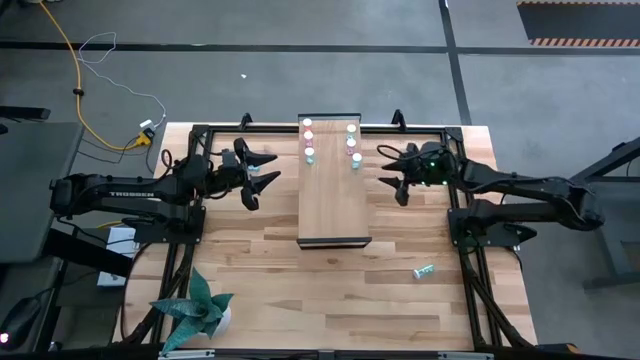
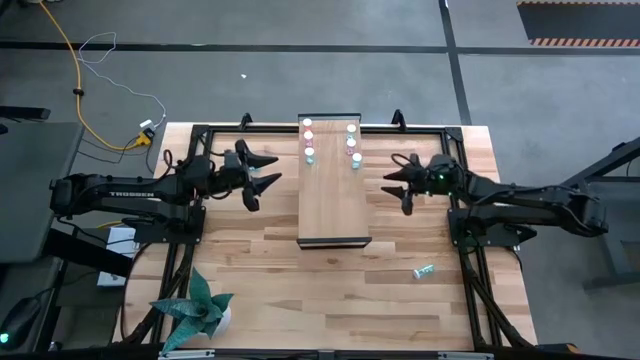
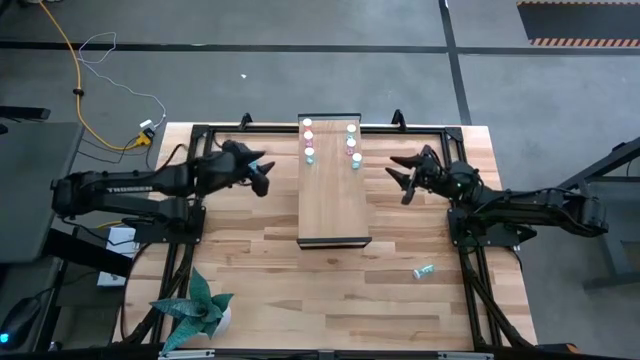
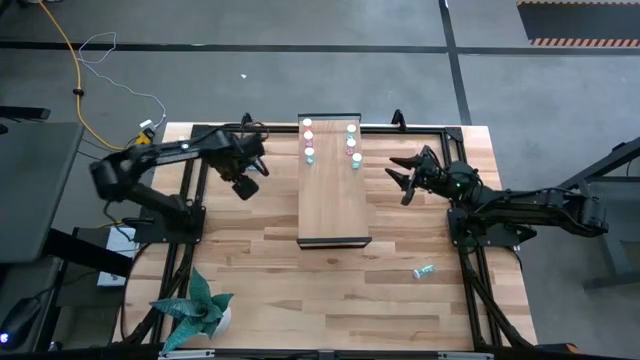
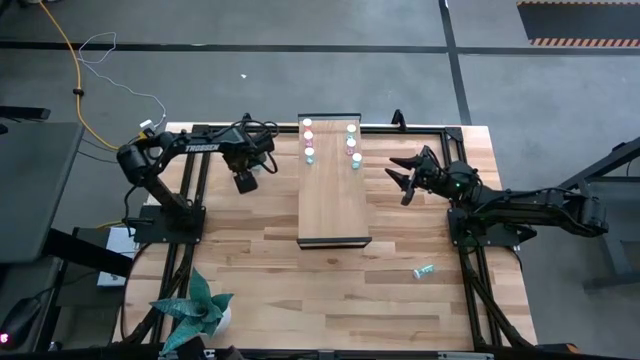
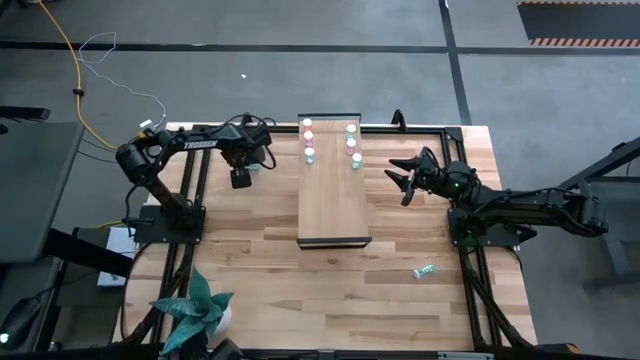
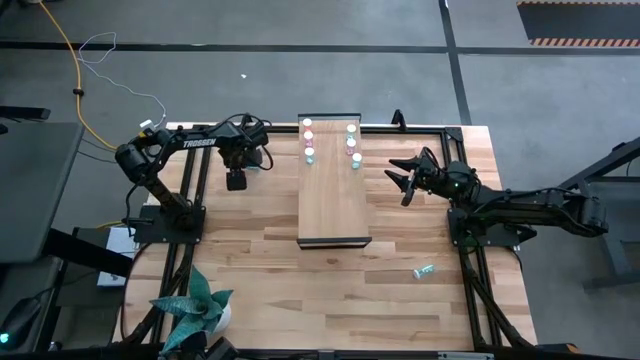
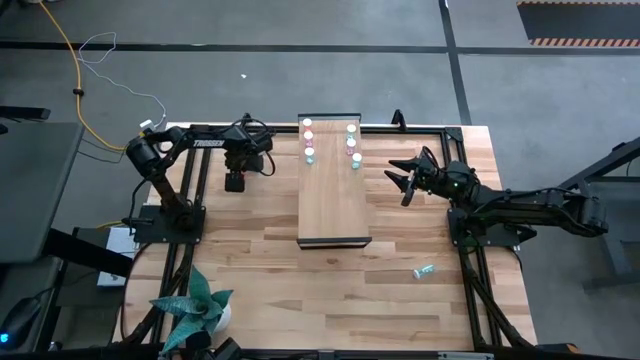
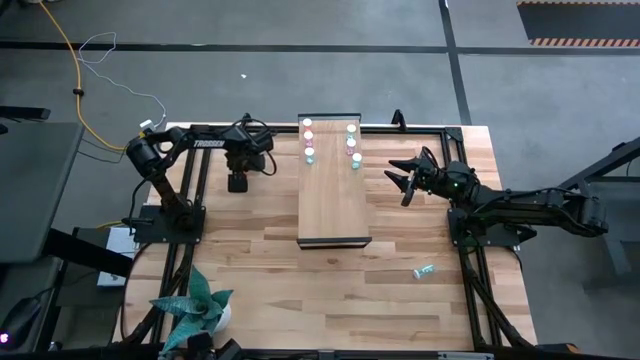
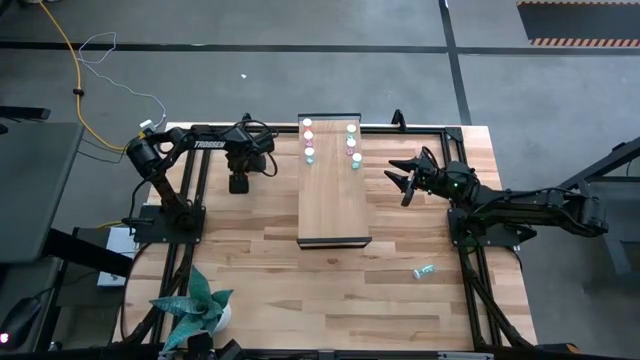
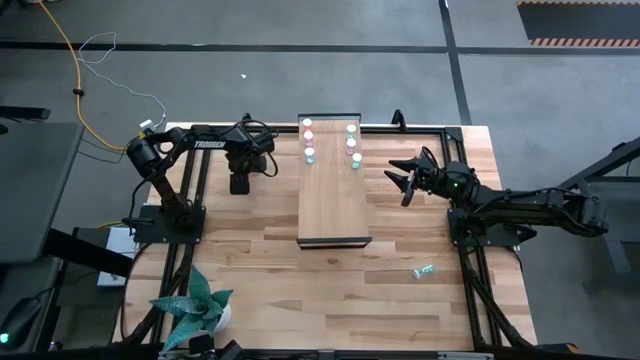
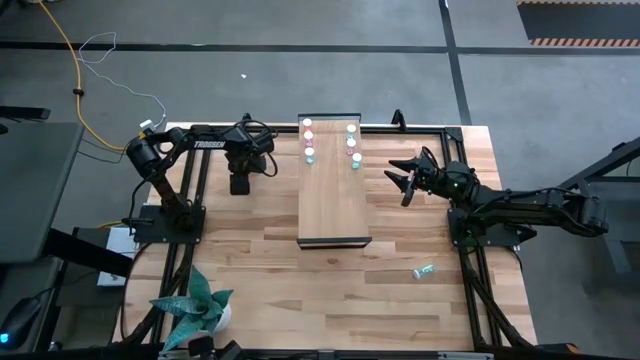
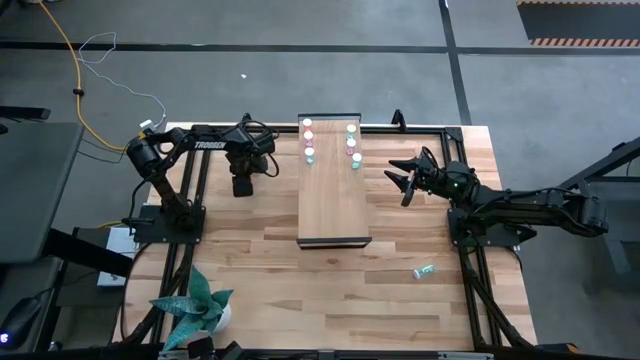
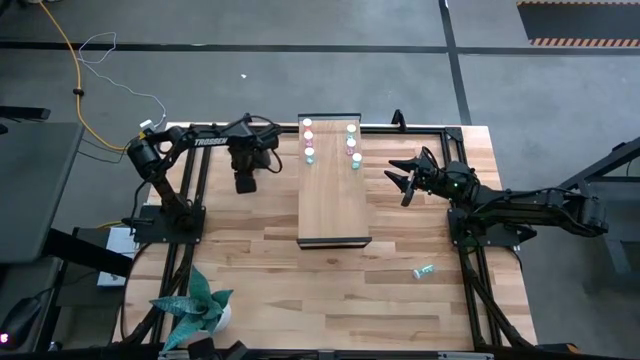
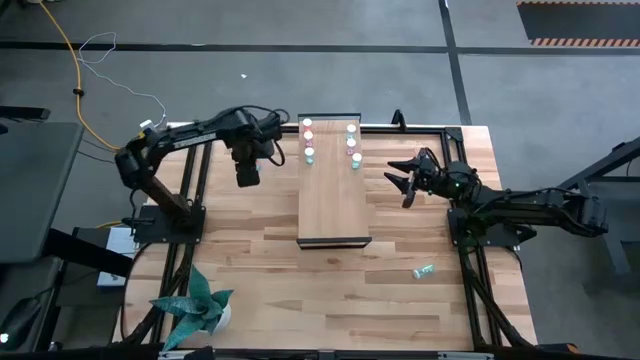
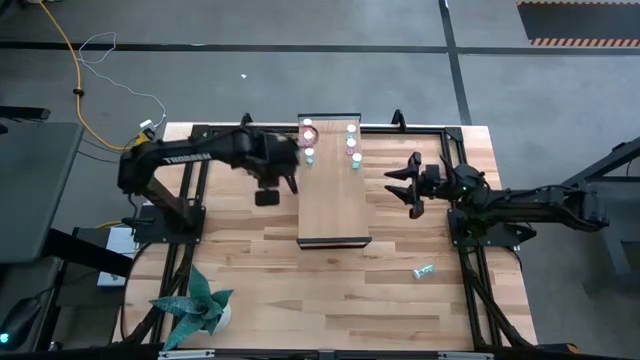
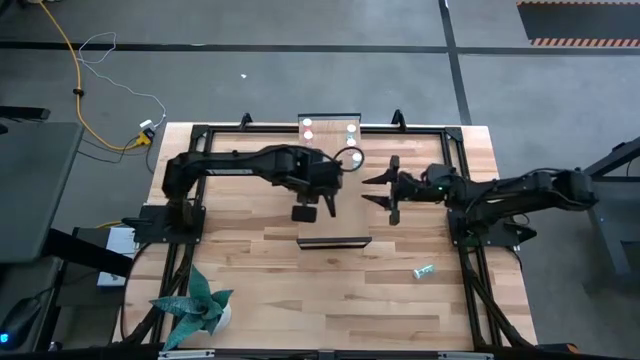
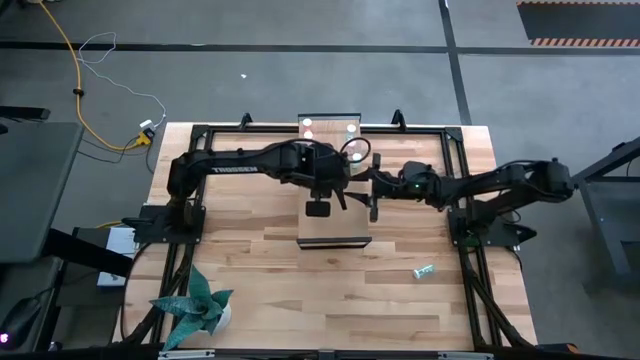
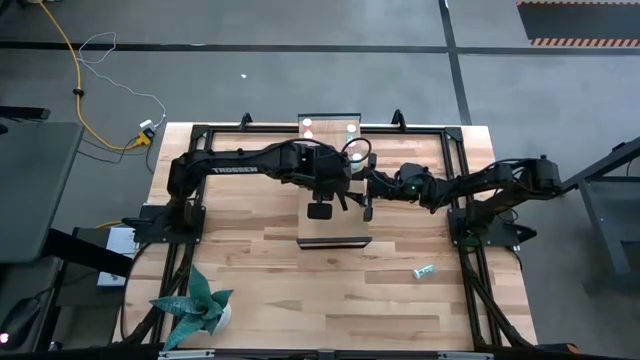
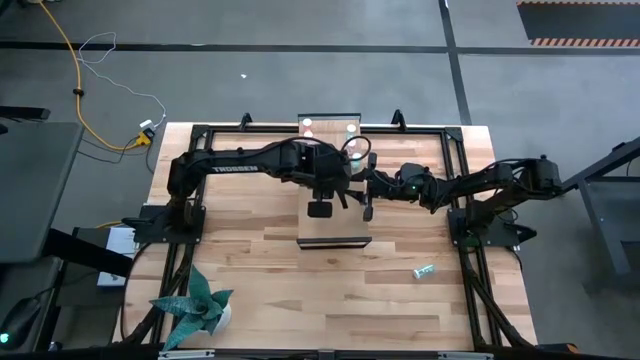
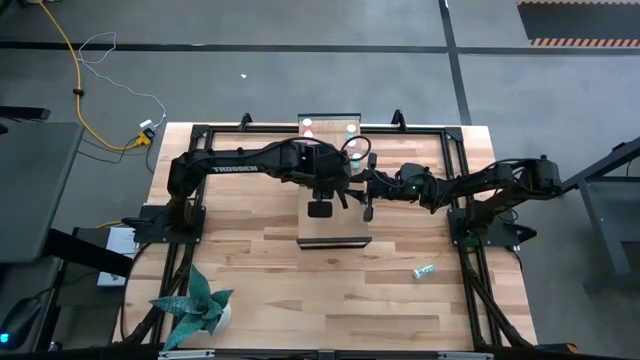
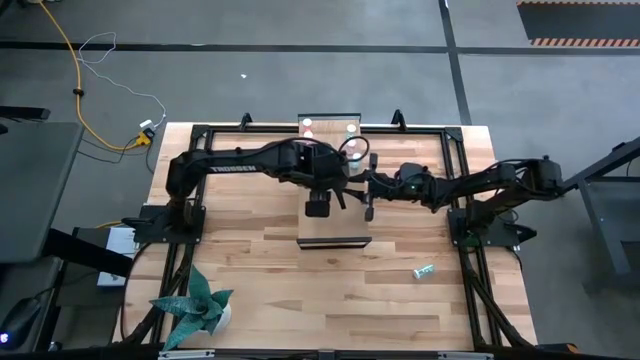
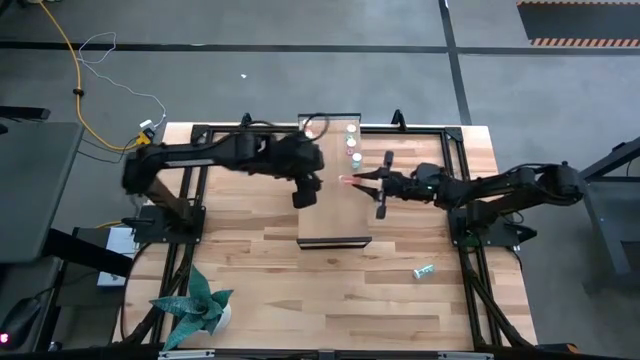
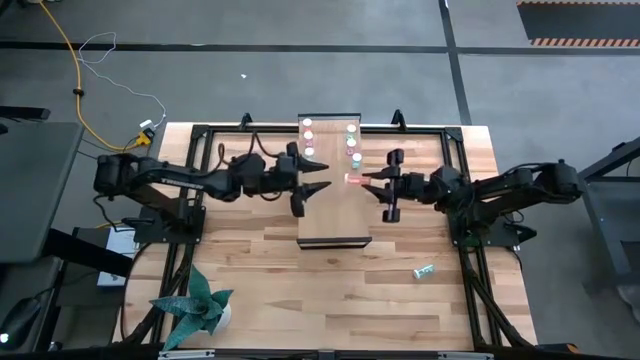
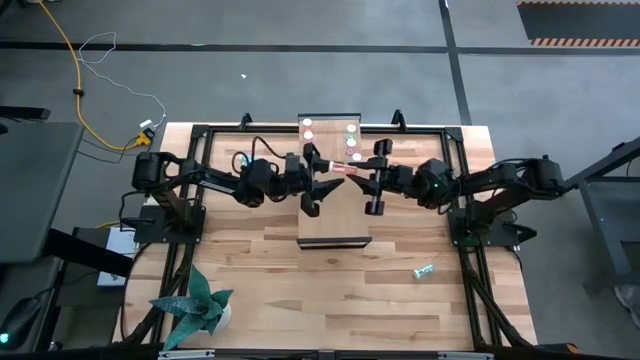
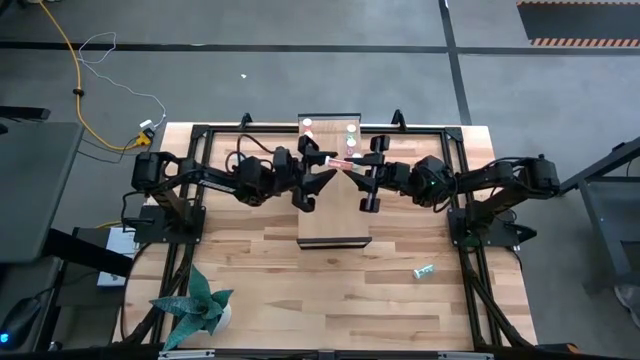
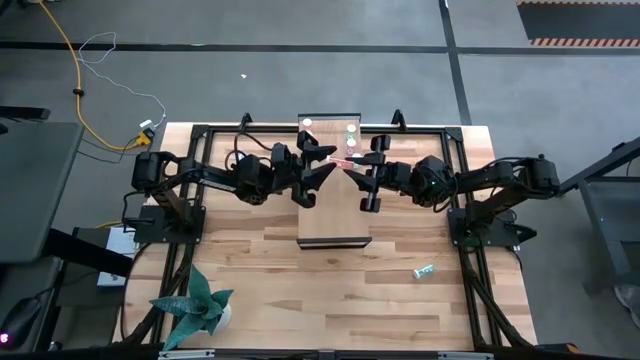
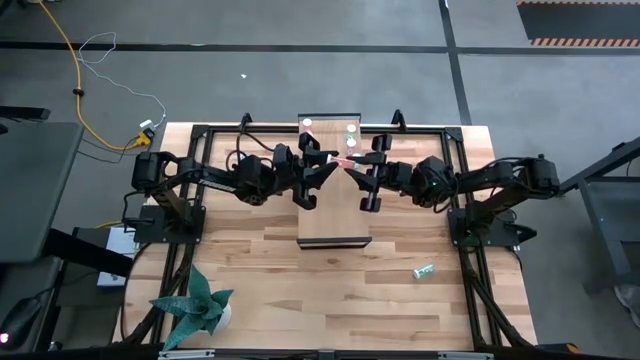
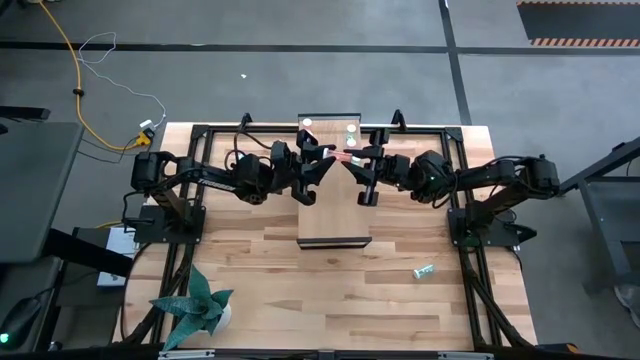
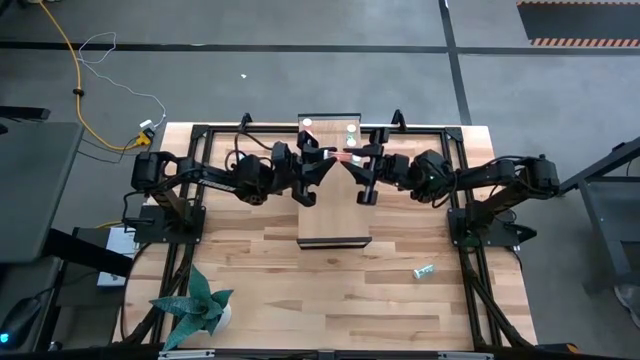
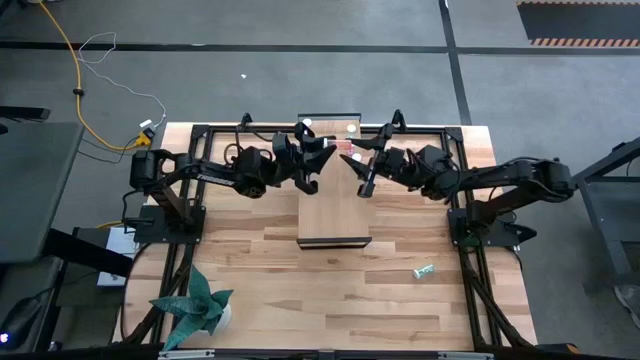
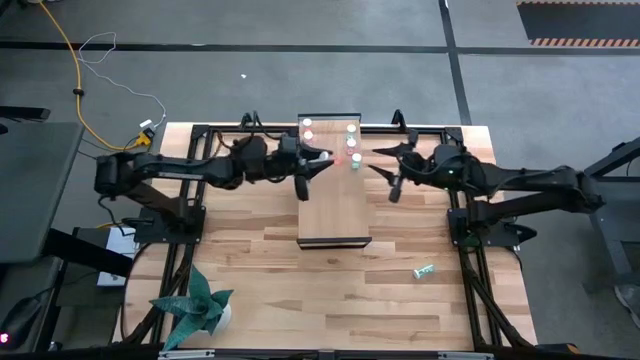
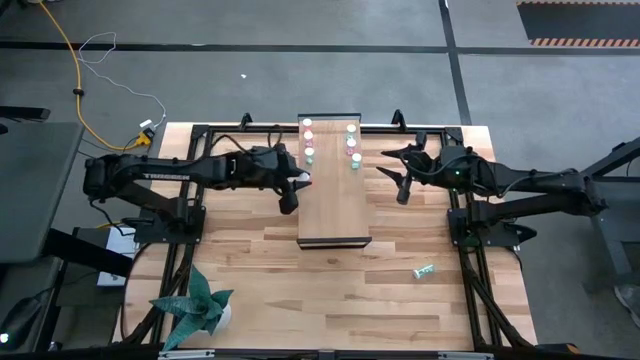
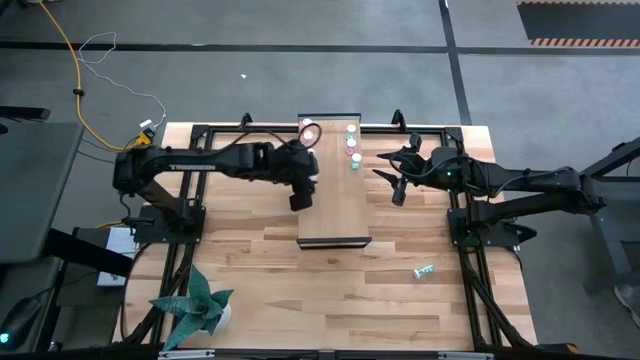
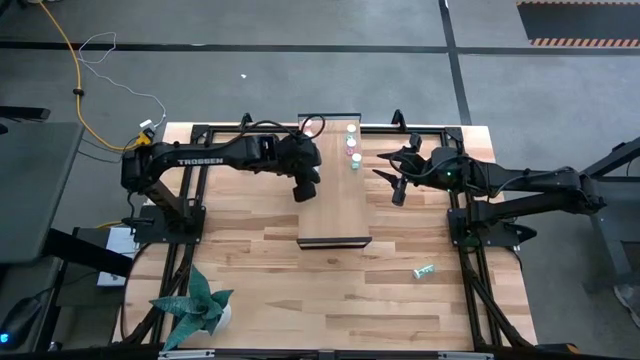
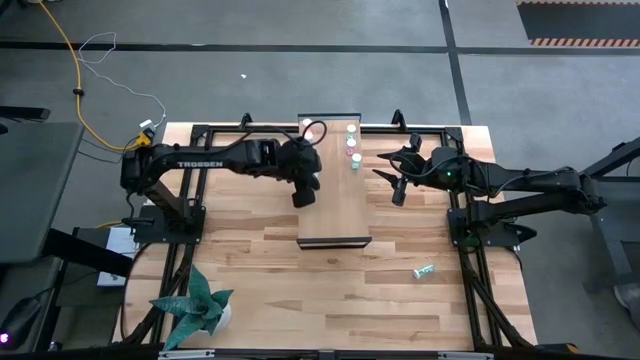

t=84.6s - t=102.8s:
Task: Pick and place medicine bottles onto shelf by color
Put the transparent orange pill bottle on the shelf

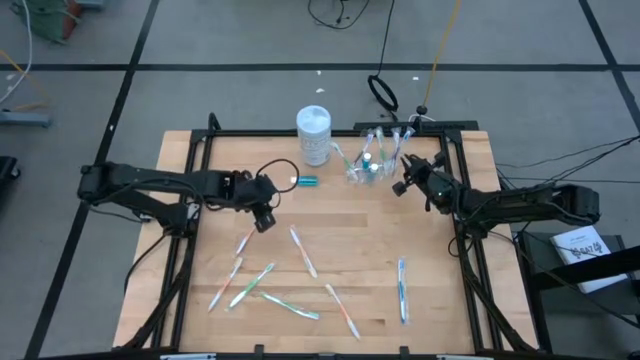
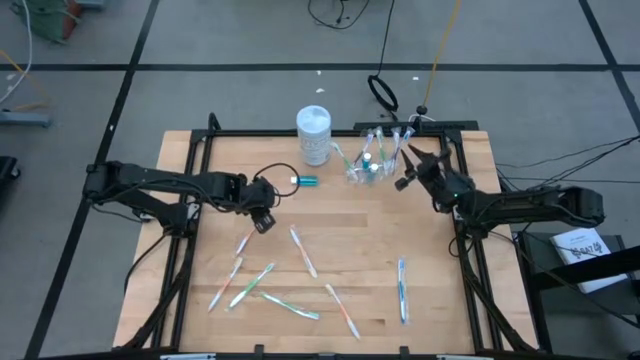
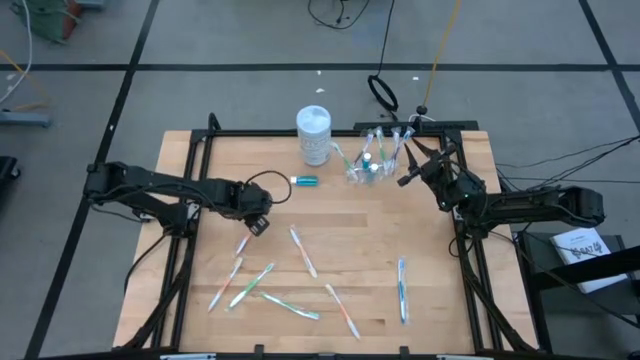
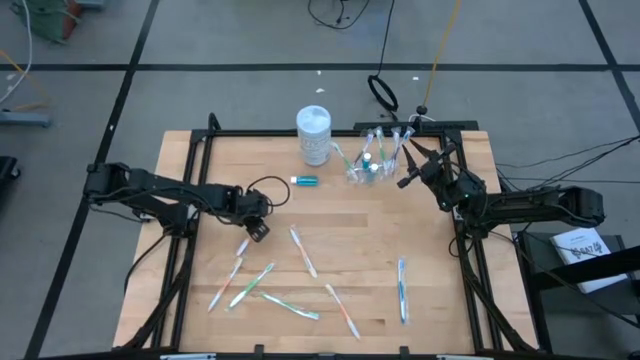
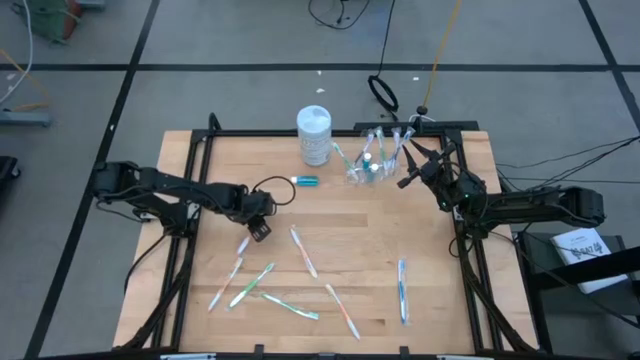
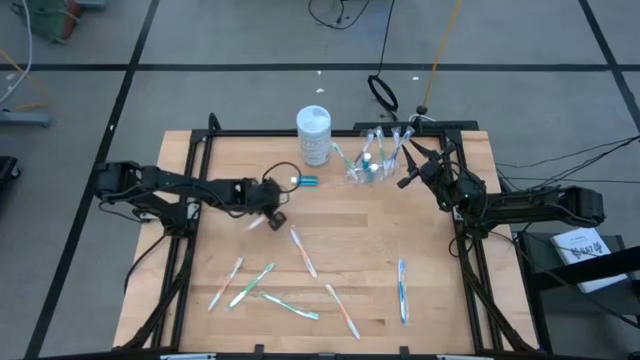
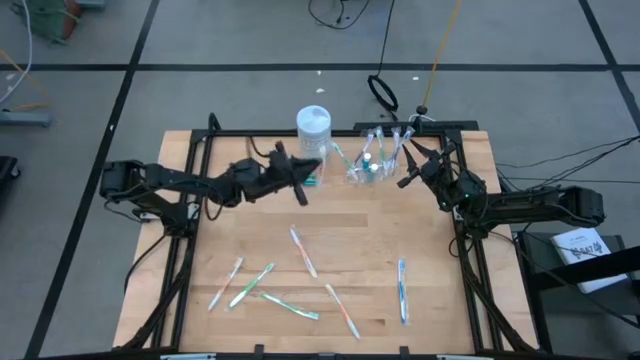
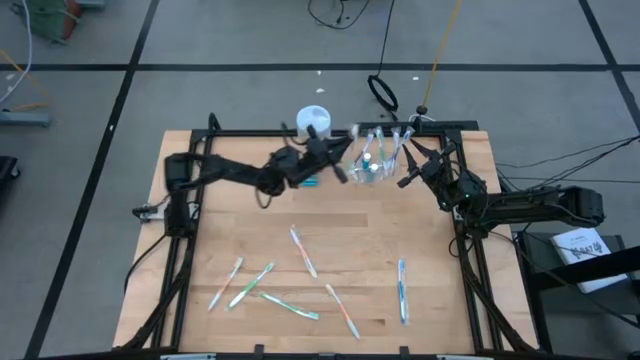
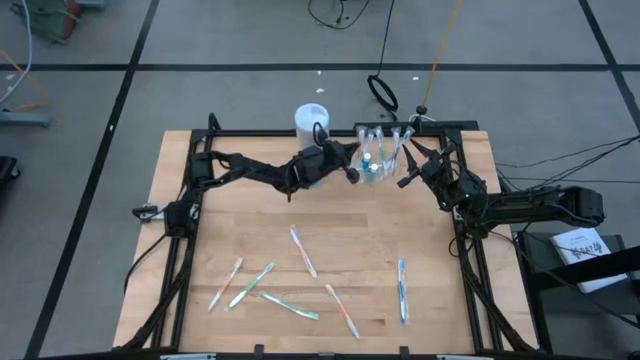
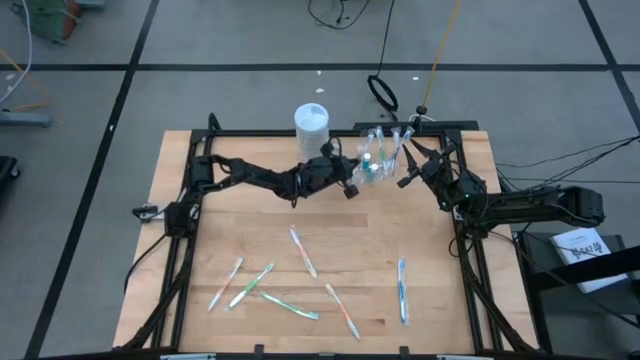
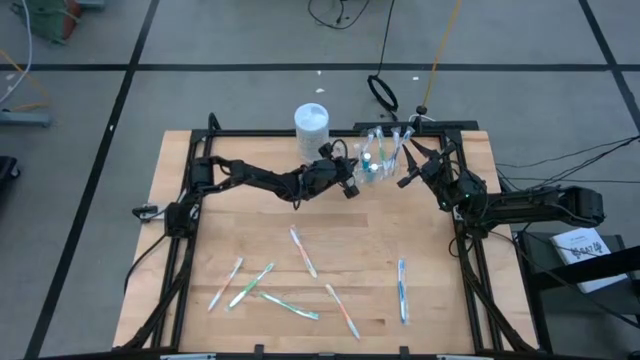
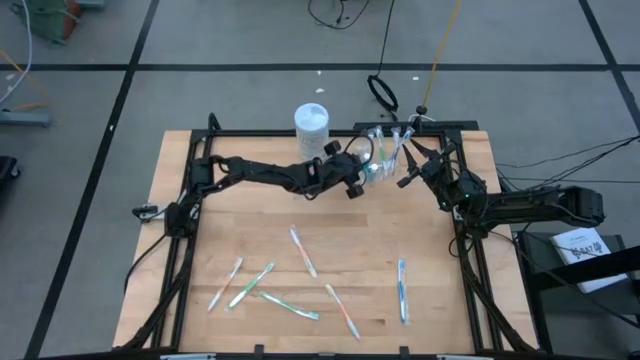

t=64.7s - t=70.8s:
Task: Pick & Place toothbrushing station
Put the orange toothbrush into the transparent organizer
